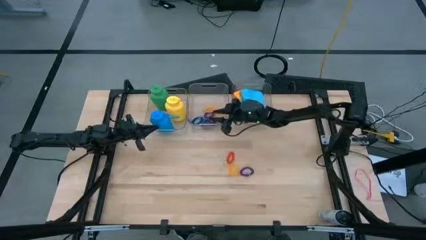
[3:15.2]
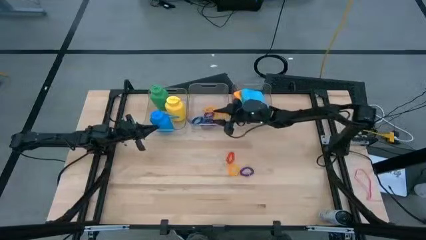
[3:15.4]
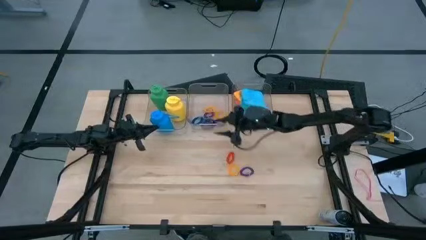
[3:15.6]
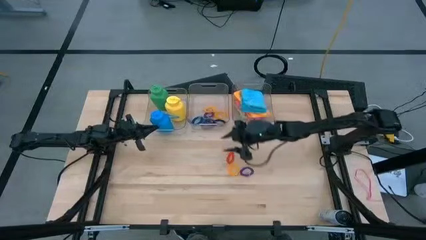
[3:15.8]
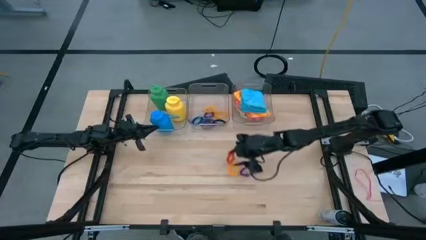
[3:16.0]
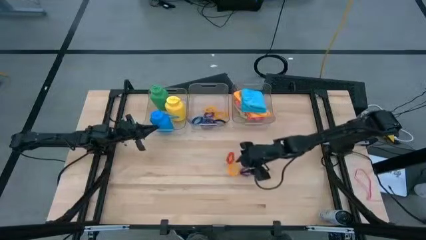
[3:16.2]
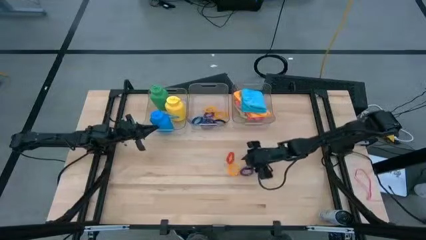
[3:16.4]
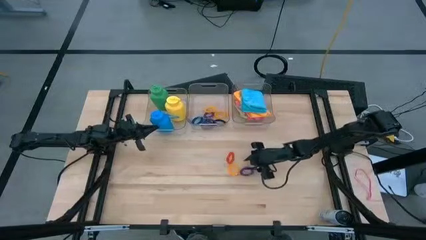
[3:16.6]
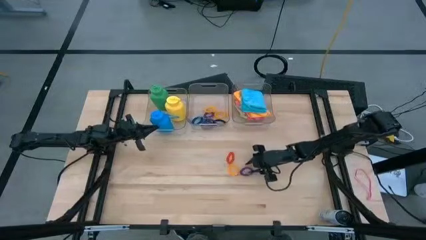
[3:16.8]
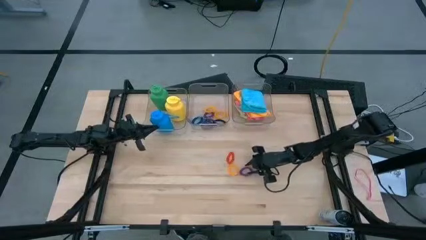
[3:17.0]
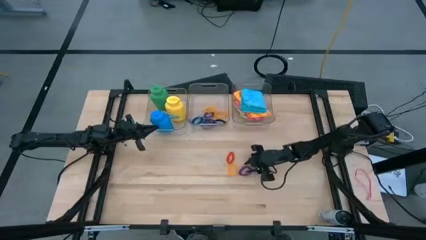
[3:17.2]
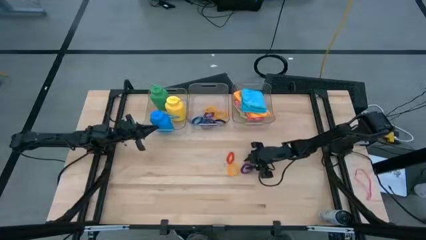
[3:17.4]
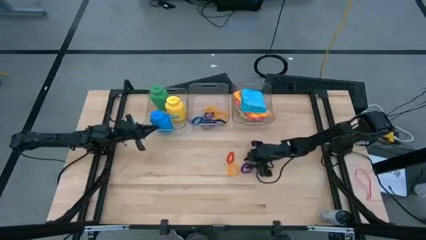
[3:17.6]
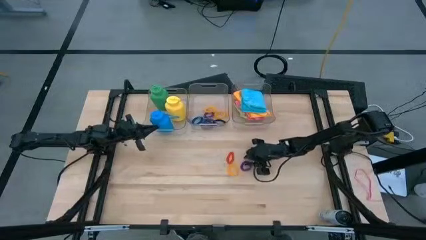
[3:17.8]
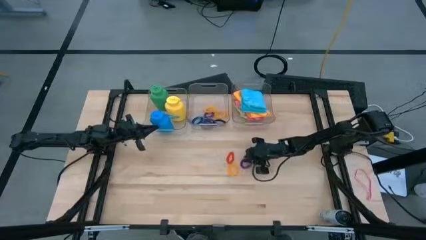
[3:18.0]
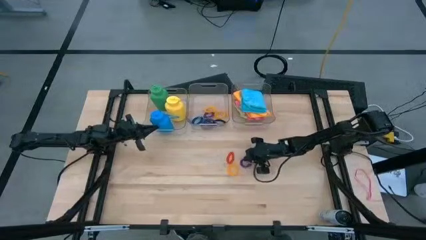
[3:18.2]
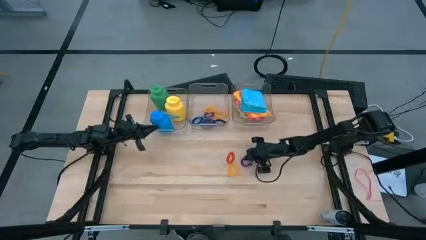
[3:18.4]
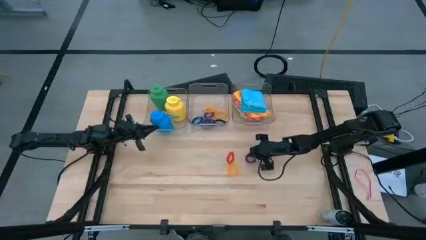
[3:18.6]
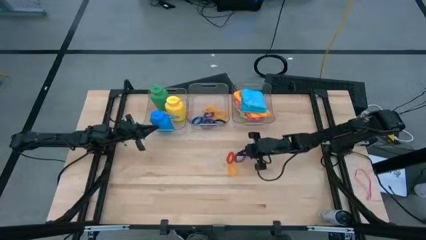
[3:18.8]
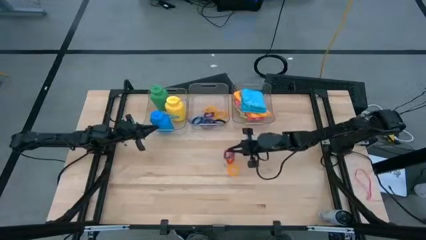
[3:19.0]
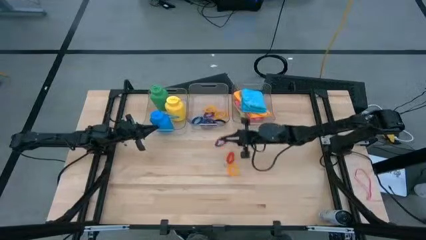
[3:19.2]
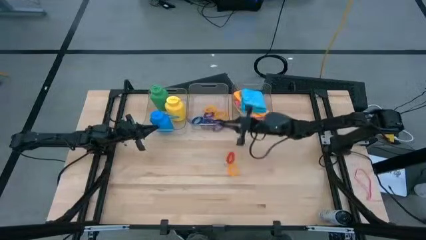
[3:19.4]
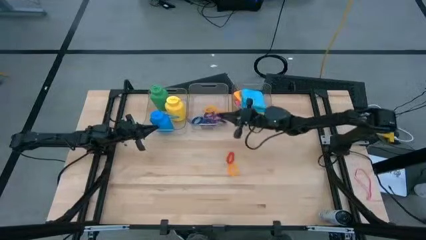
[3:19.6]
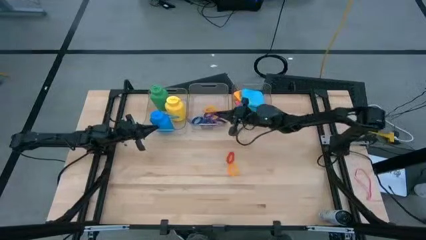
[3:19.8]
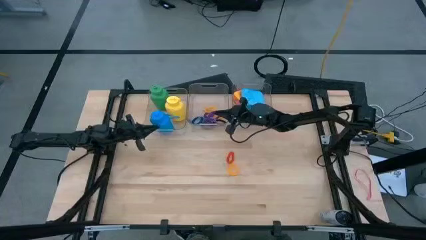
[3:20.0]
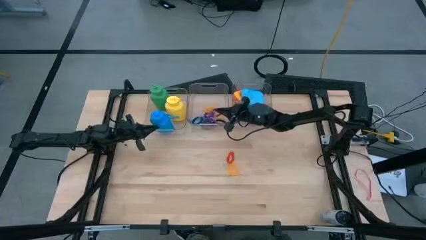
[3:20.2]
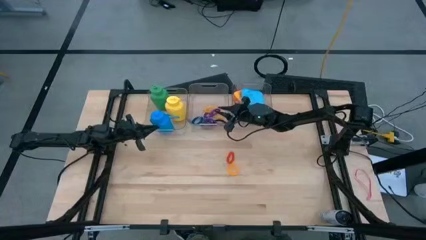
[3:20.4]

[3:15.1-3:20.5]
Task: Pick & Place Sports Items
Put the purple wrist coil into the middle transparent container

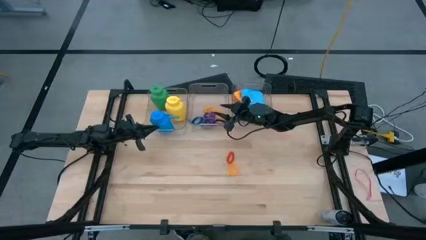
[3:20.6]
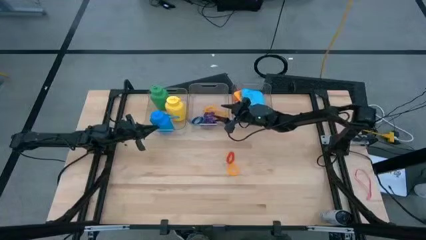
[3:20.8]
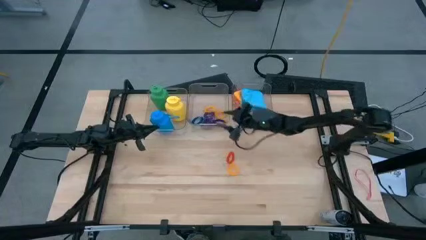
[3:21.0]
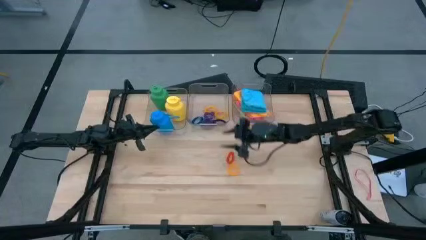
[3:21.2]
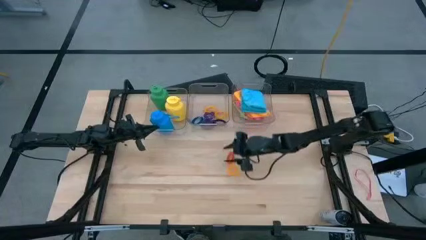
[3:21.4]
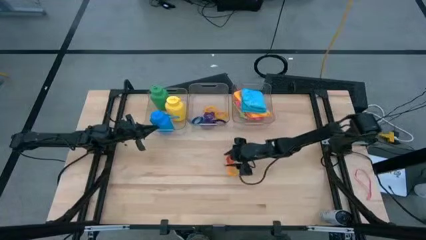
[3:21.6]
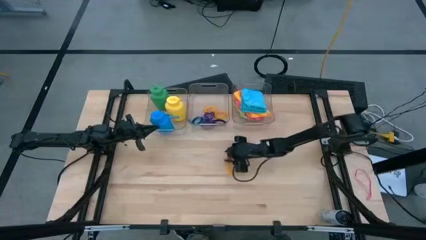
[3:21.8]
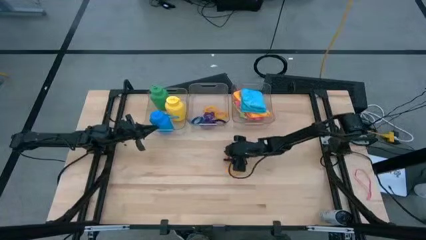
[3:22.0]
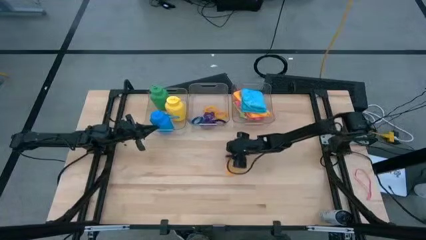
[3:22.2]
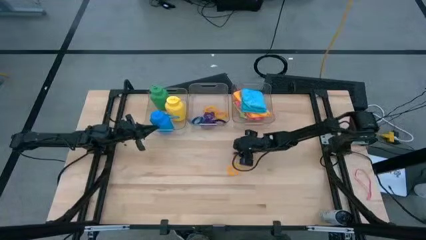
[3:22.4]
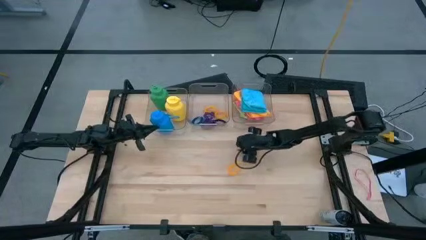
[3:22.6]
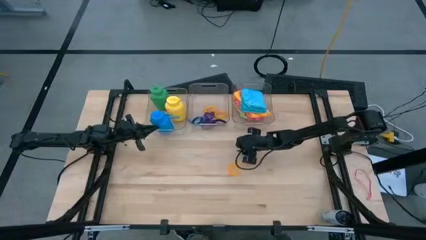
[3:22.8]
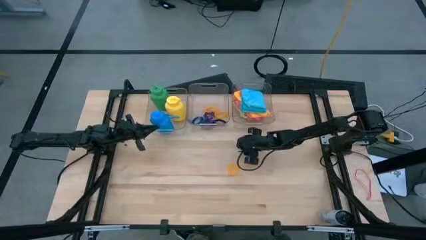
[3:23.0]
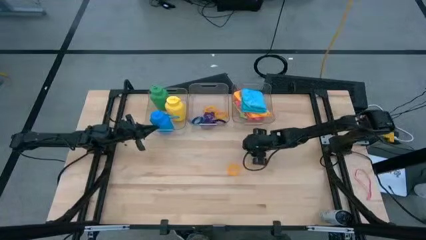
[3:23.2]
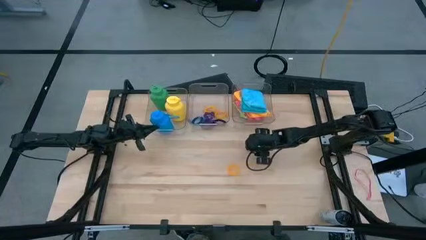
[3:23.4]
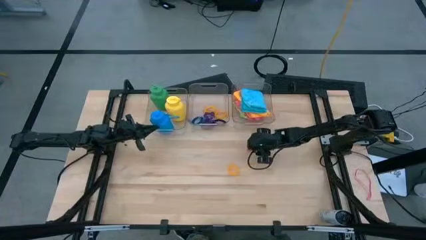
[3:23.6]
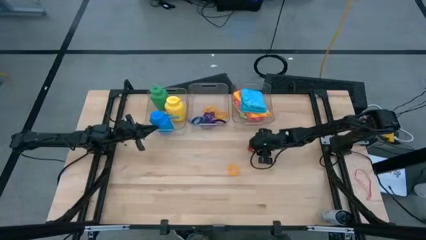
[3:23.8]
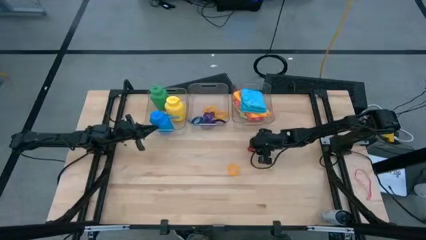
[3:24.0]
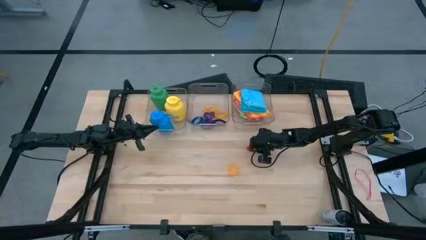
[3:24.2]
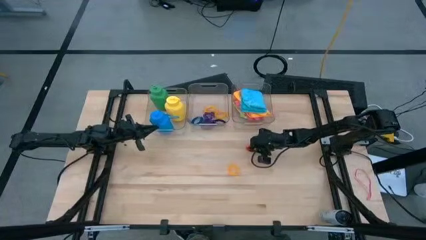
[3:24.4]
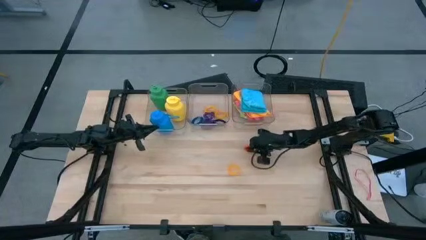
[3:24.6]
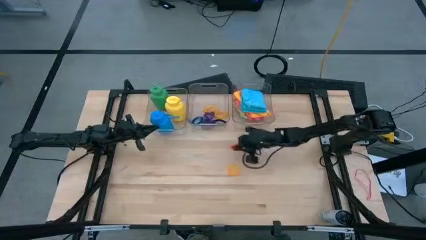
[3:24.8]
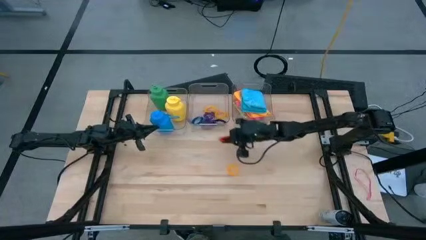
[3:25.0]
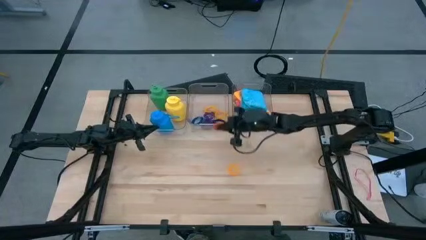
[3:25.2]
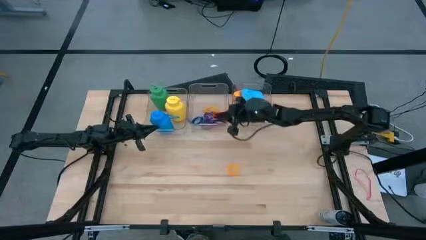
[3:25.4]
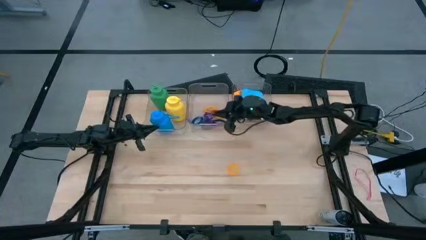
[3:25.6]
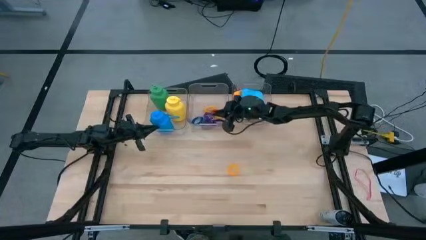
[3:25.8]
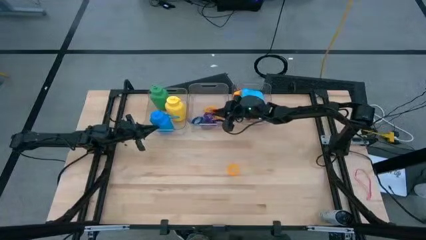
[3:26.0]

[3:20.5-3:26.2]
Put the red wrist coil into the middle transparent container

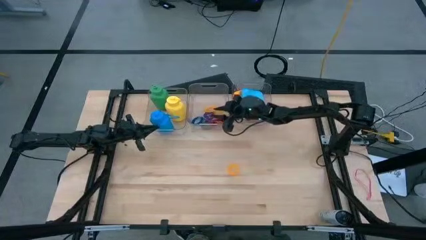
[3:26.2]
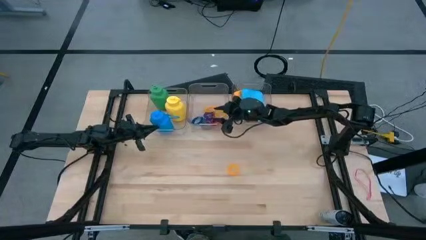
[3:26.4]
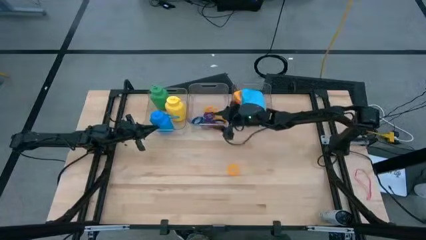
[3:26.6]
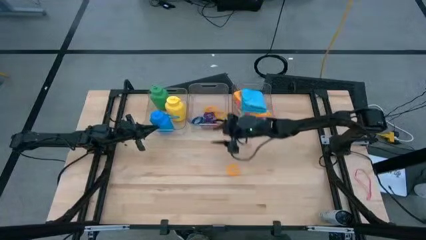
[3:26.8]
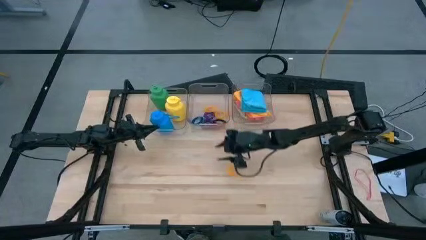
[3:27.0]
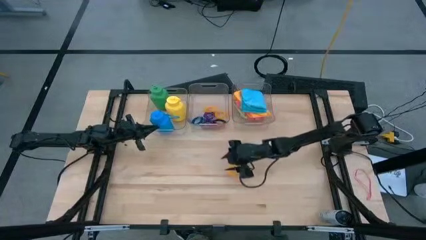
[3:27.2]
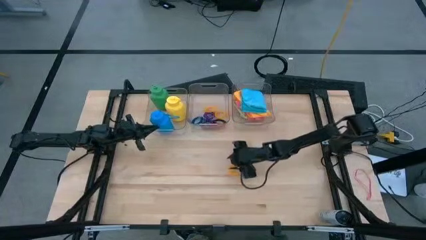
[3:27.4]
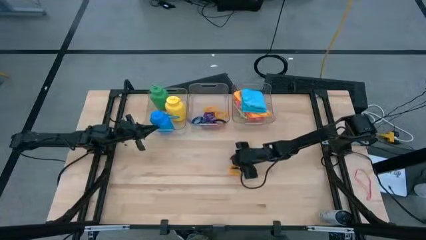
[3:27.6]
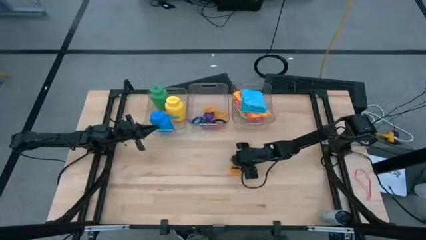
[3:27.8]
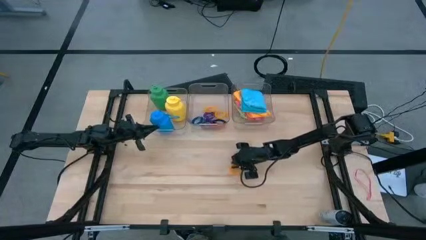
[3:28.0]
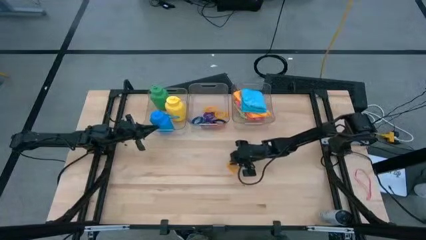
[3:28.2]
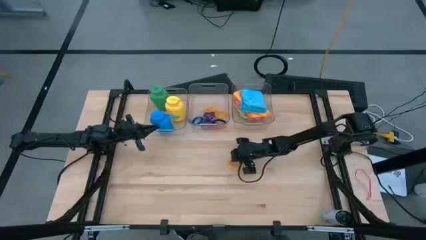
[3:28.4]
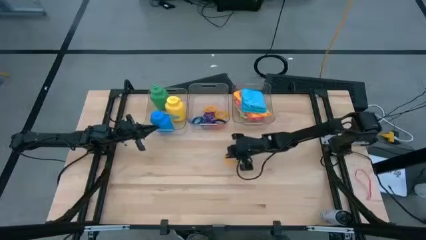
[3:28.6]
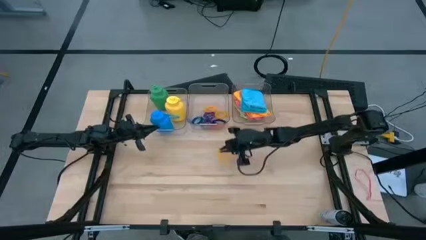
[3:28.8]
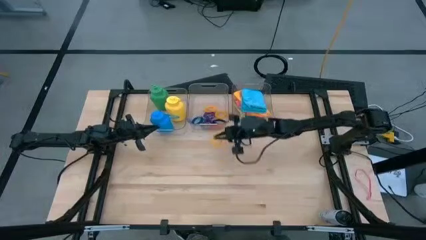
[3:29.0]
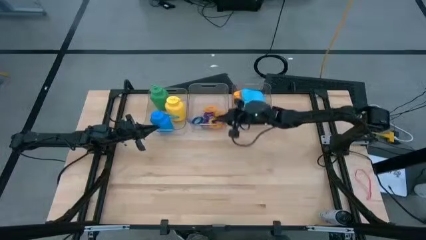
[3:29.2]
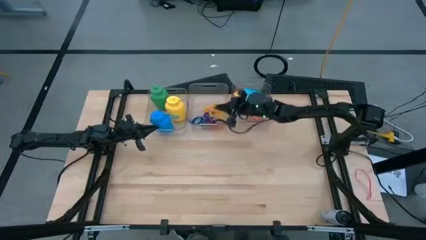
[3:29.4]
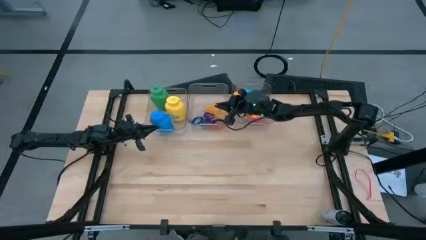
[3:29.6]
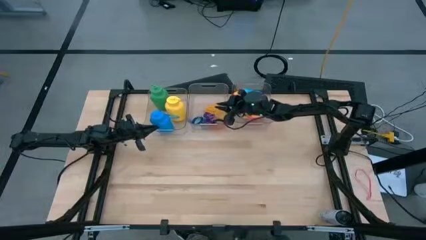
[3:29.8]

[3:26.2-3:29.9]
Put the yellow wrist coil into the middle transparent container

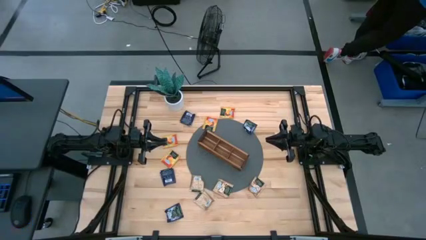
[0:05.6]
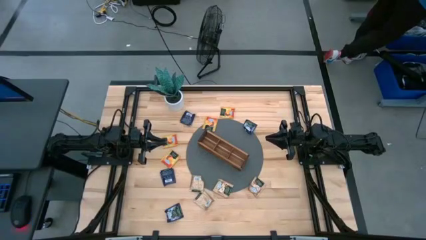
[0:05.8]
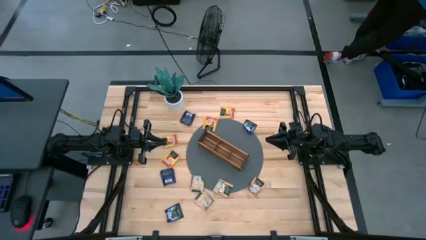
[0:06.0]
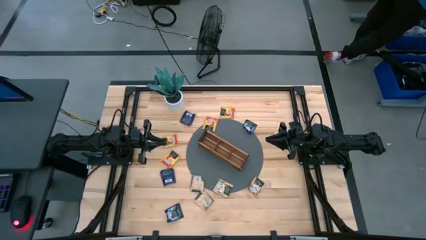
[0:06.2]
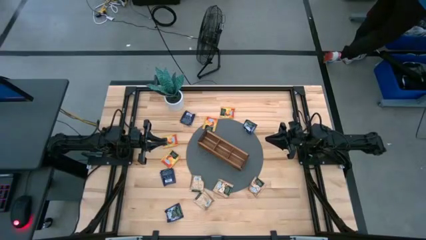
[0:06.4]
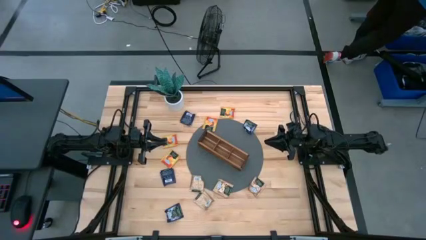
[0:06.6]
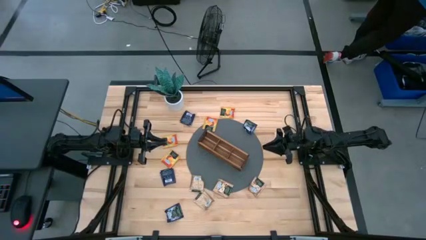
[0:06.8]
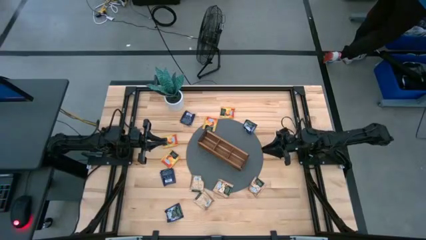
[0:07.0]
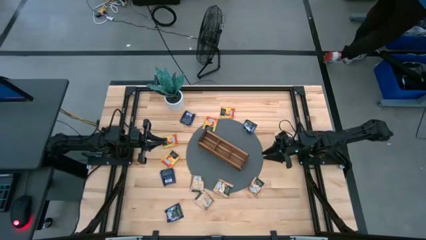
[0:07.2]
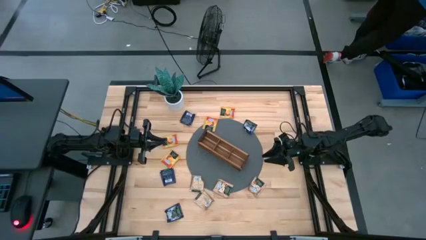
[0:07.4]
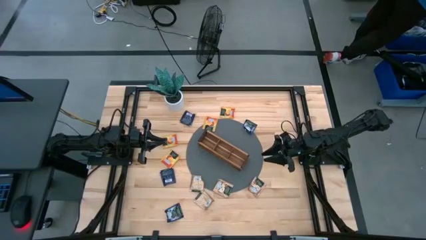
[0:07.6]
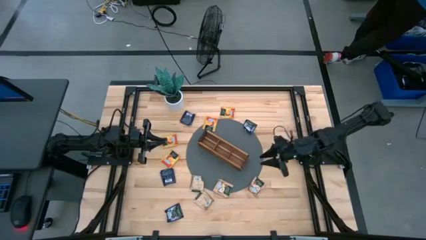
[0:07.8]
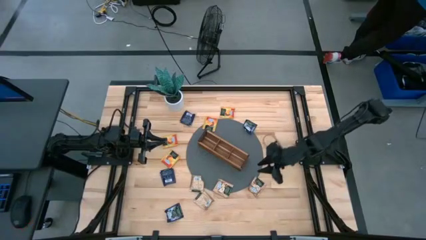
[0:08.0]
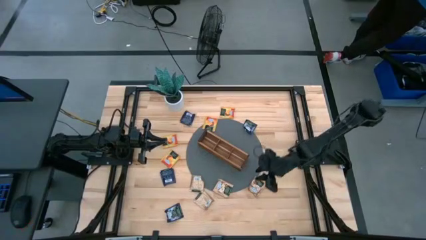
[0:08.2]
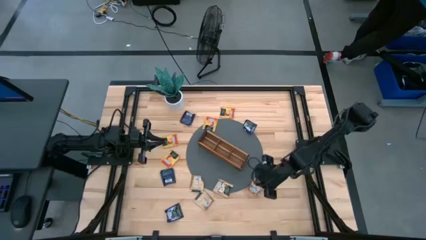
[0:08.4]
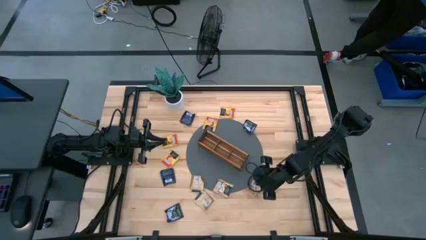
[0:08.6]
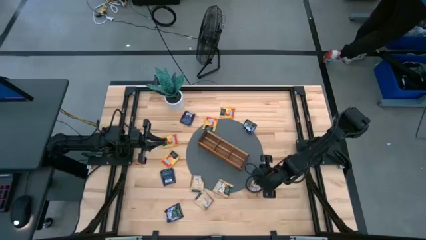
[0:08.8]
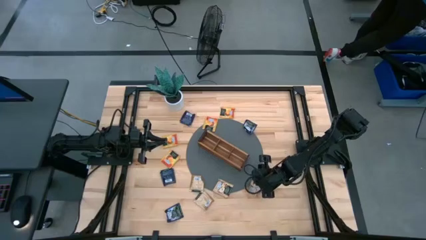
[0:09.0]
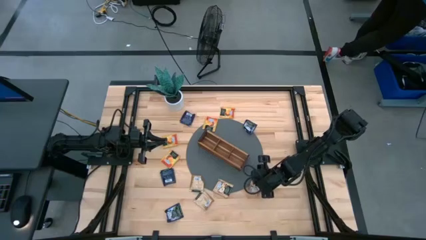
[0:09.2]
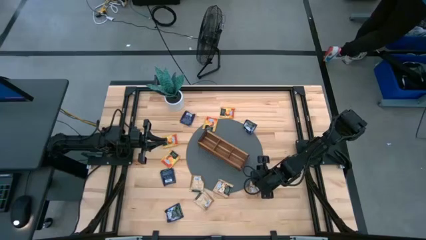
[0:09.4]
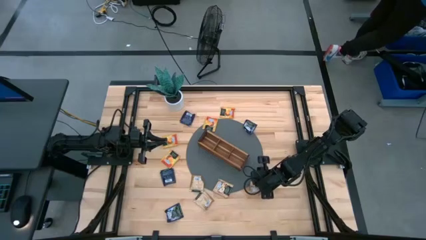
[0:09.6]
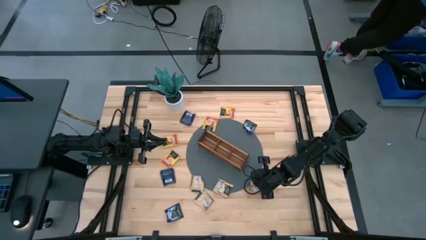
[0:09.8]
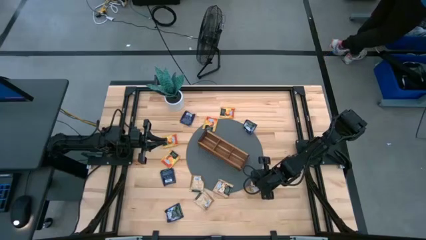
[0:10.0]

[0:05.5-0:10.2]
Task: Pick & Place Tea
Put the brown tea bag into the right section of the wooden organizer
